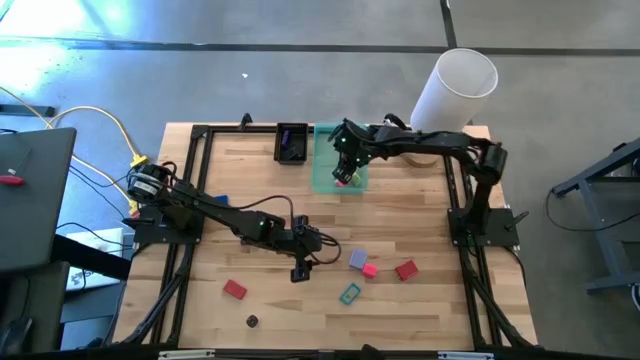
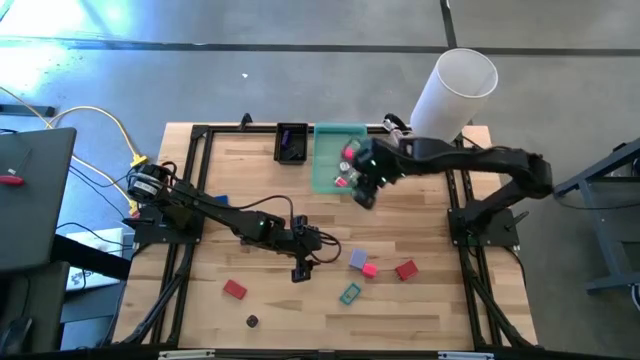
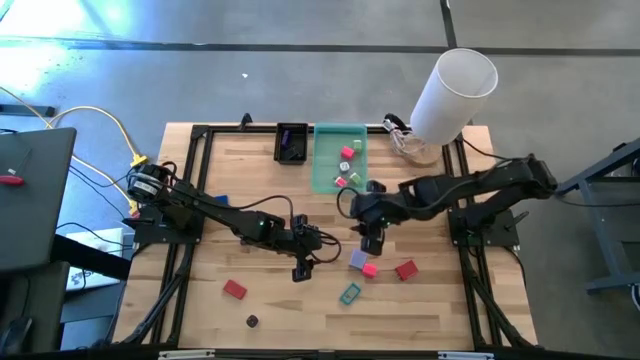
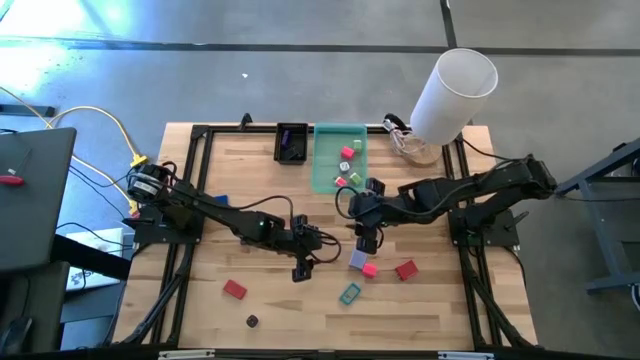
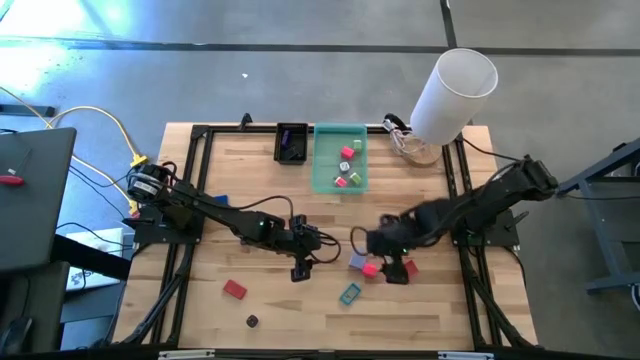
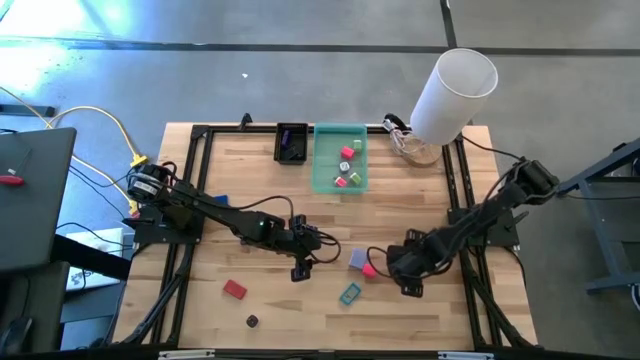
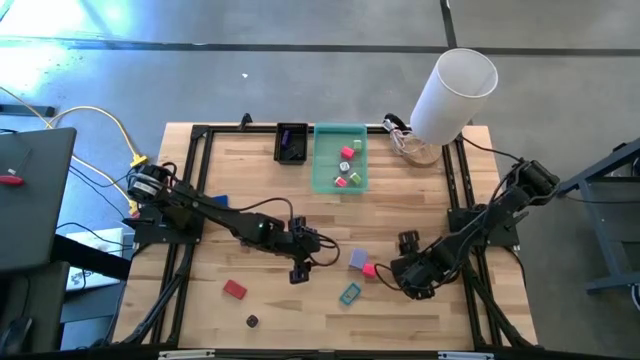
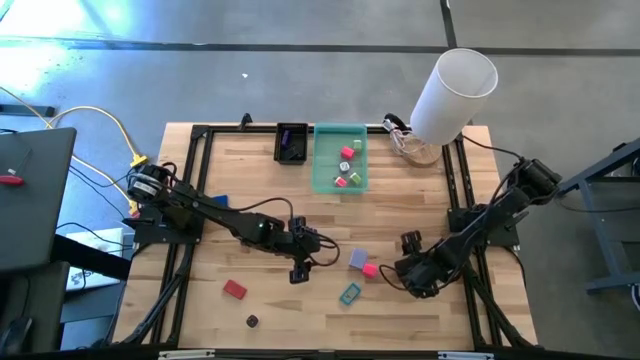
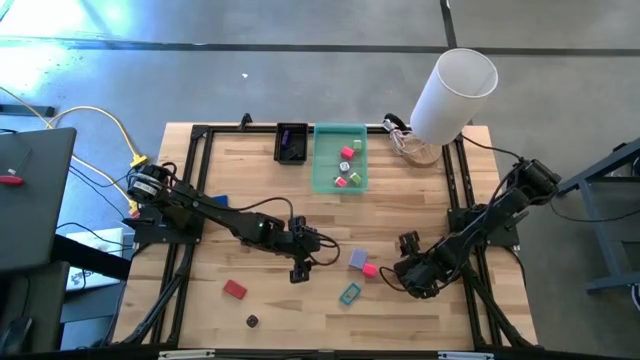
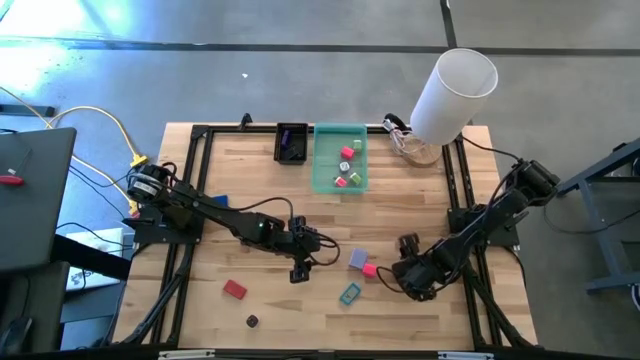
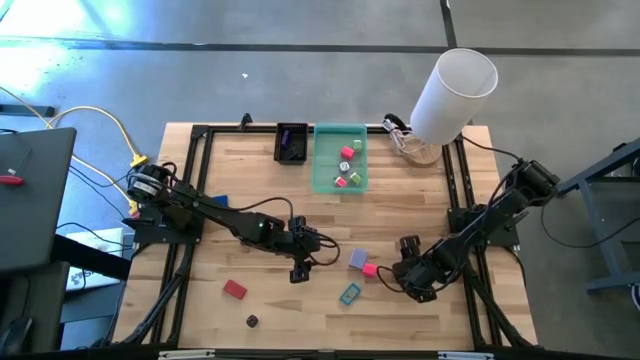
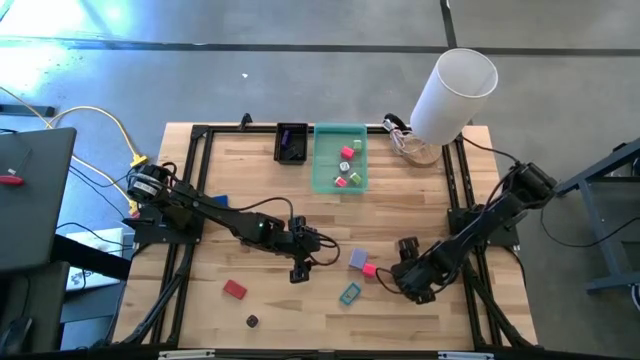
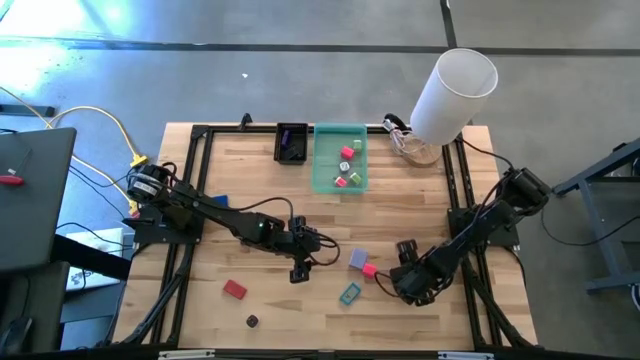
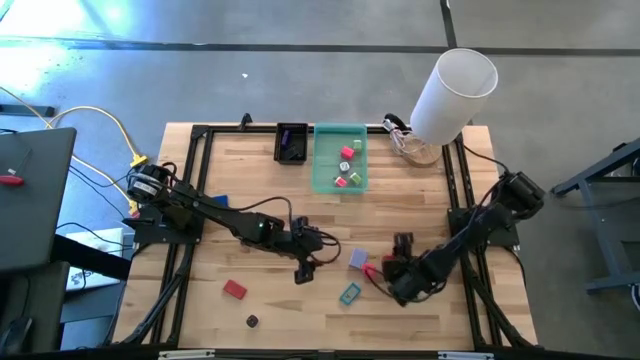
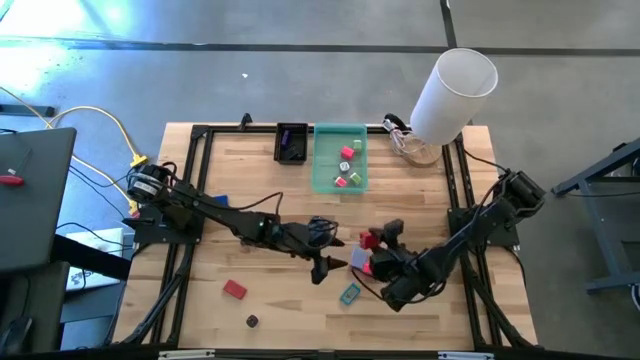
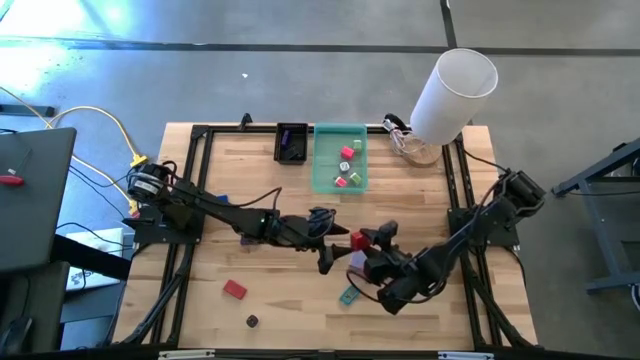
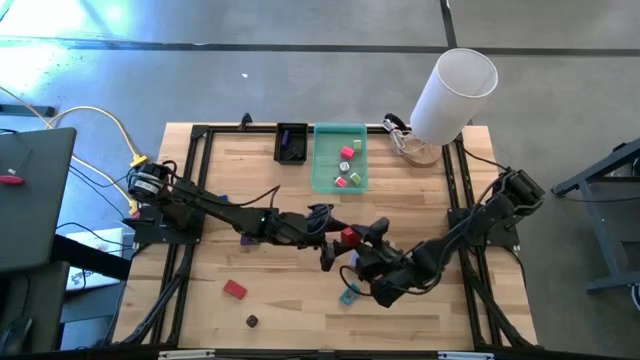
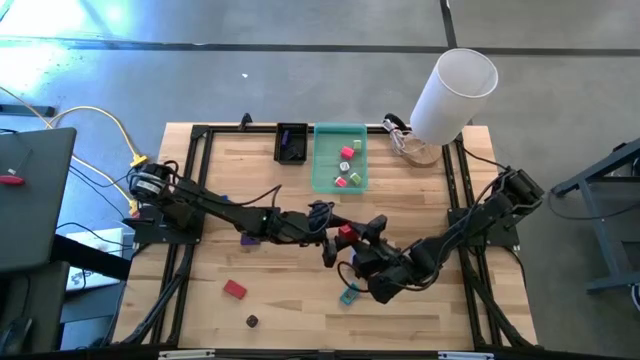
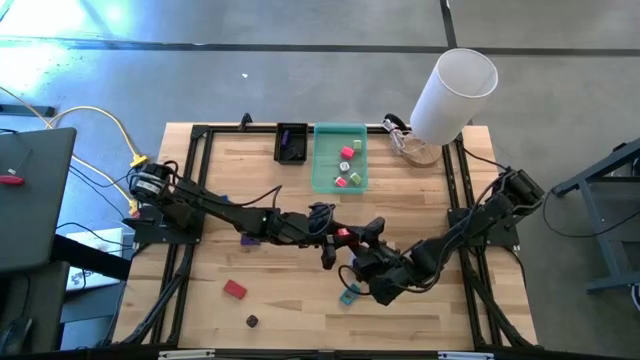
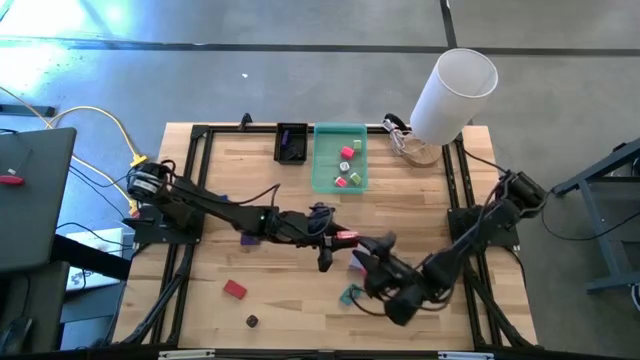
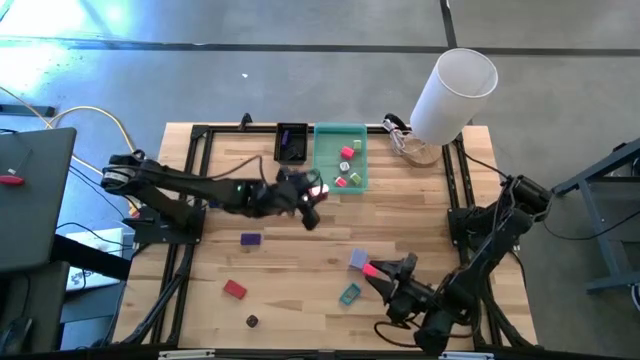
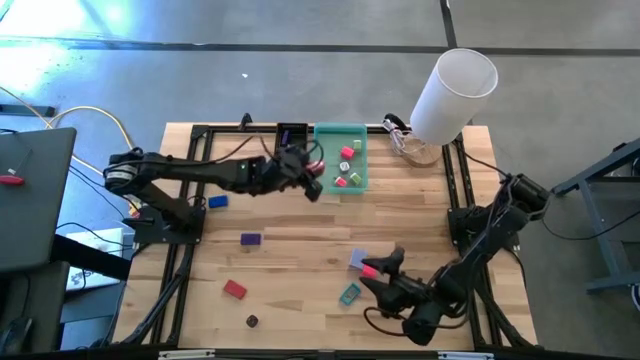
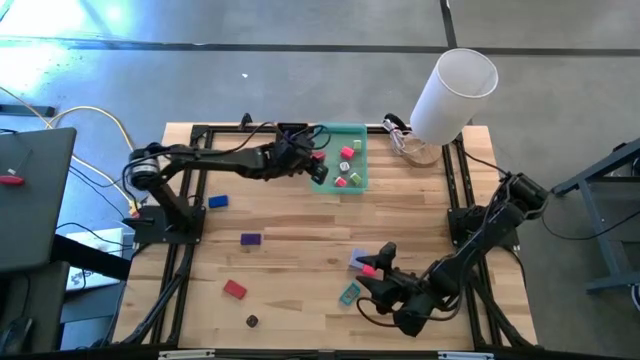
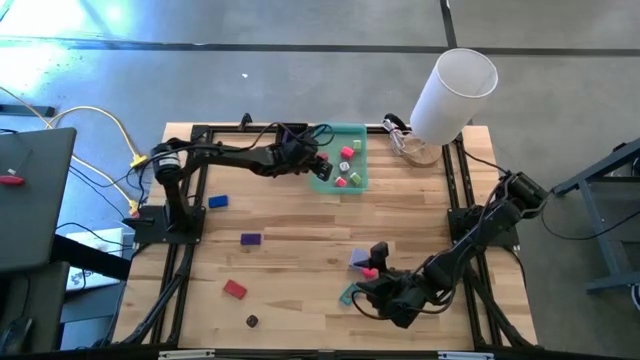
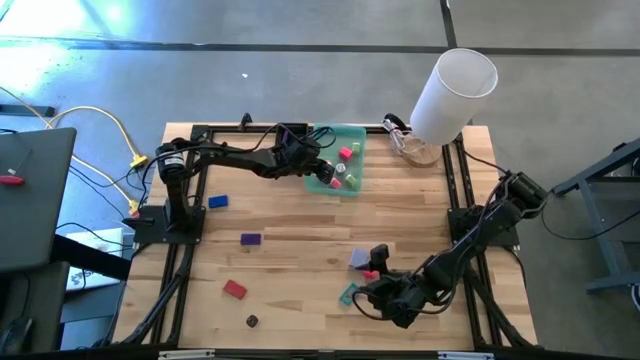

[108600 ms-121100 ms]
Task: Pick & Place Office items
Put the red charger adapter into the green bin

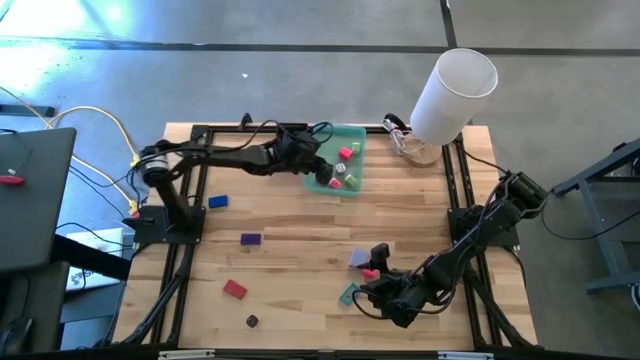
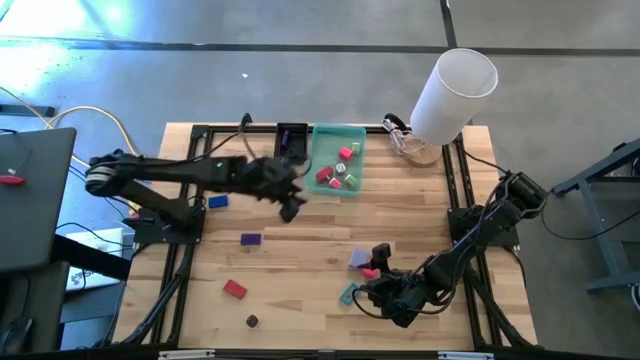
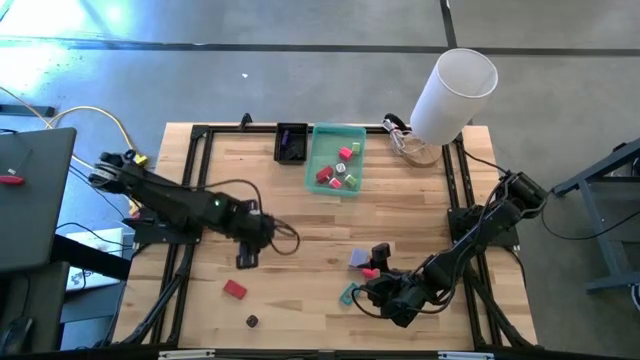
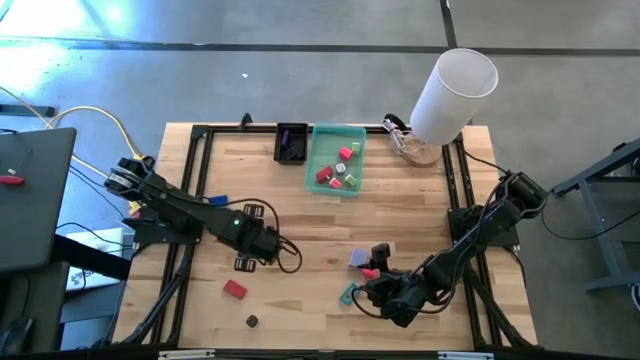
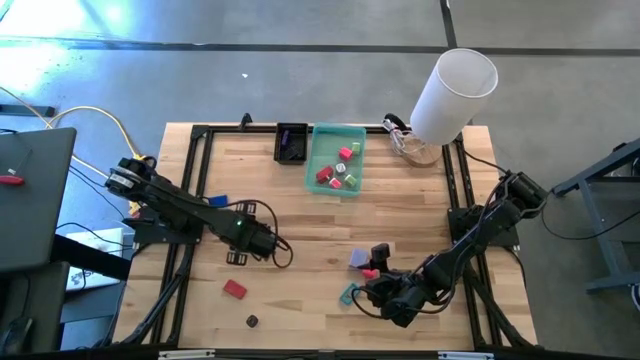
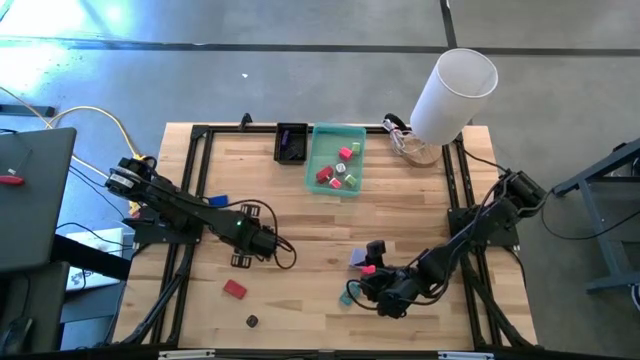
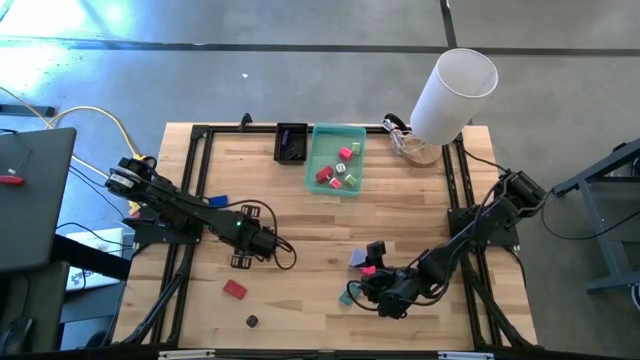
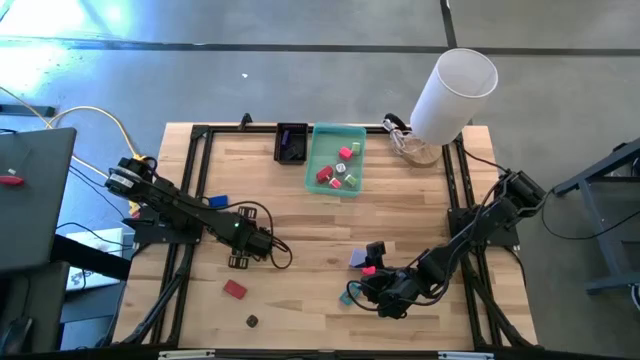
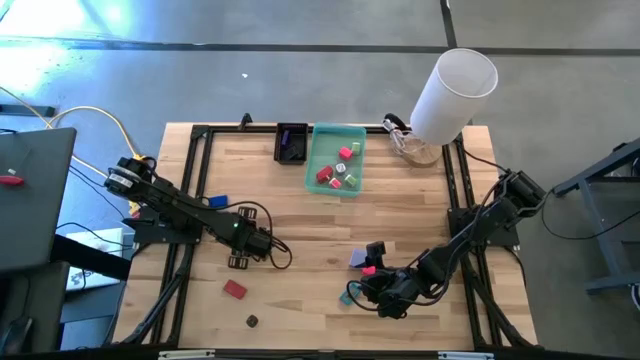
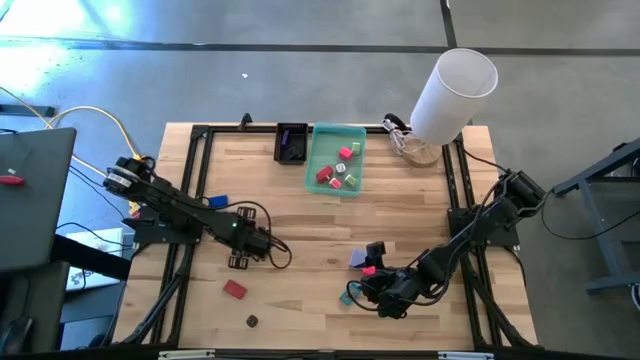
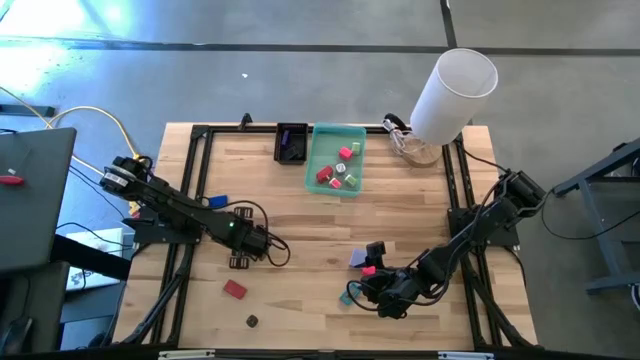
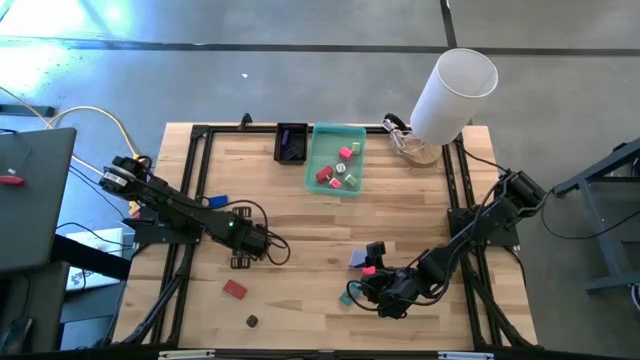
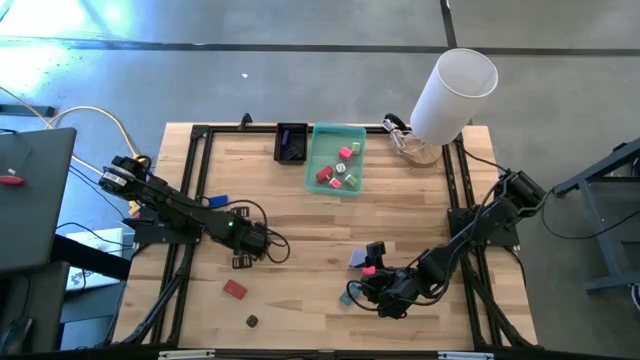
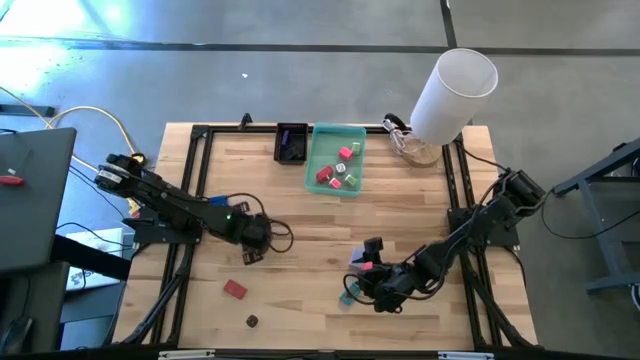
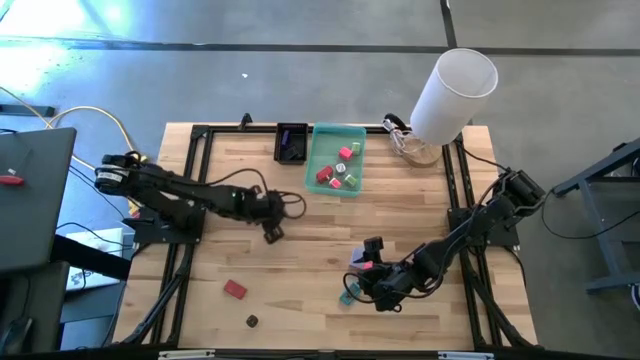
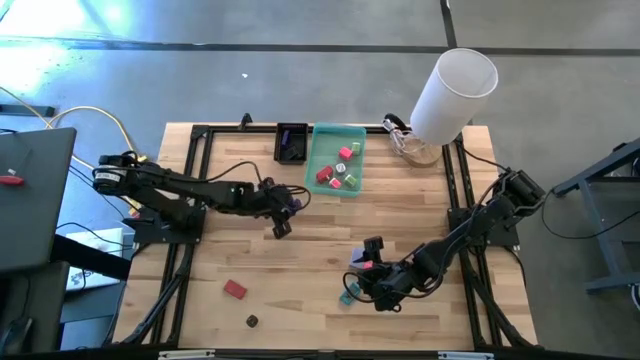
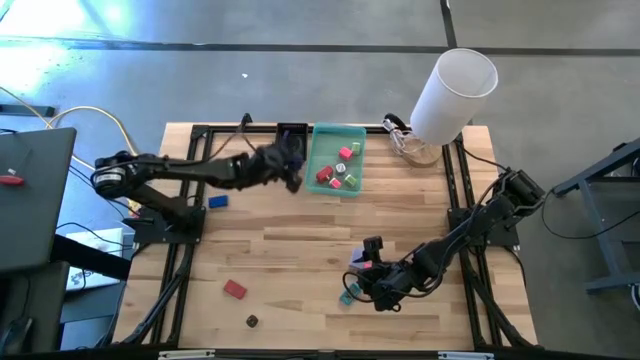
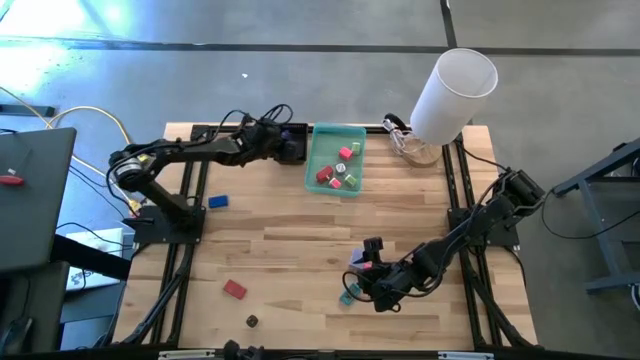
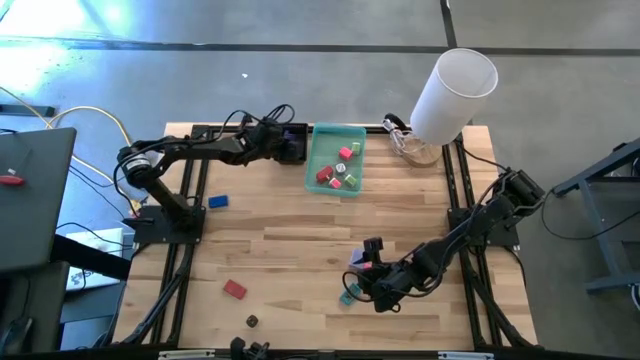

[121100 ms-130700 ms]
Put the purple digital clock into the black bin
